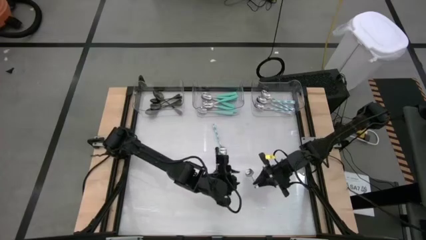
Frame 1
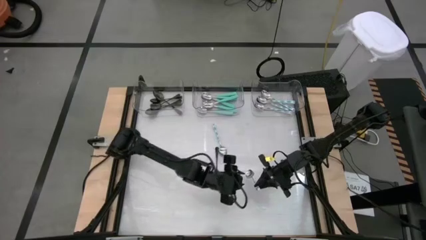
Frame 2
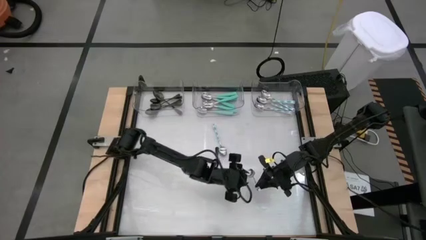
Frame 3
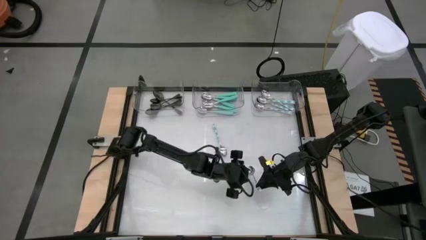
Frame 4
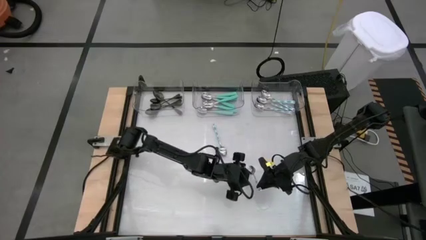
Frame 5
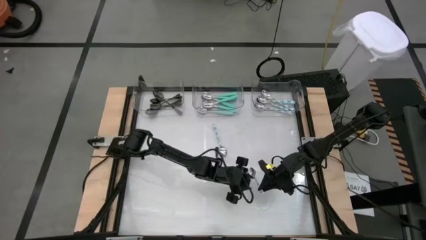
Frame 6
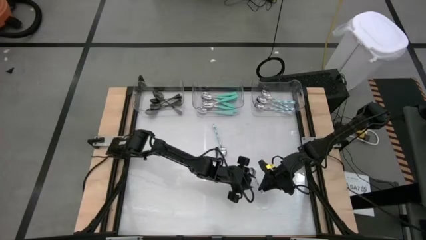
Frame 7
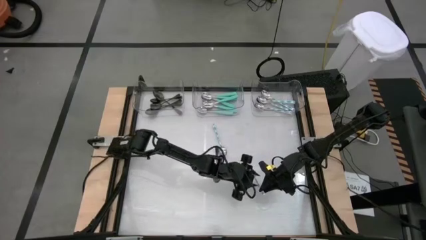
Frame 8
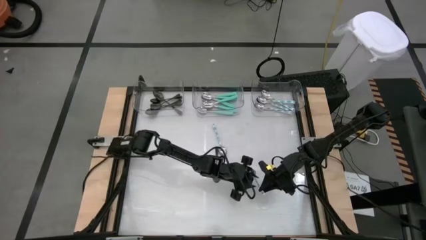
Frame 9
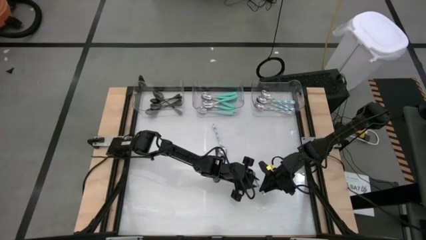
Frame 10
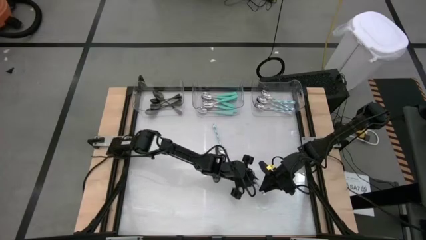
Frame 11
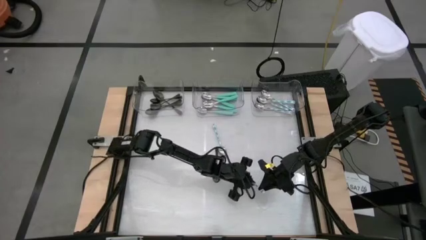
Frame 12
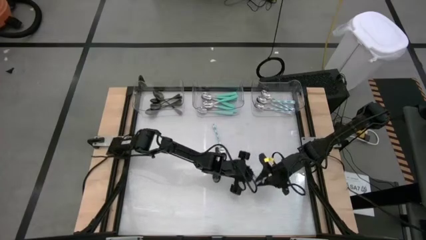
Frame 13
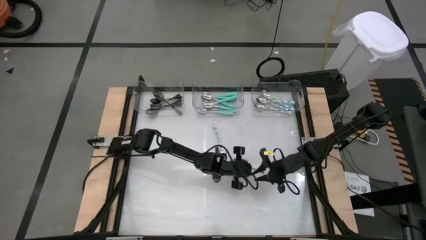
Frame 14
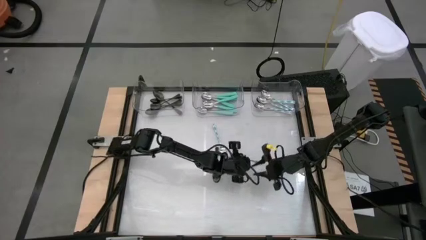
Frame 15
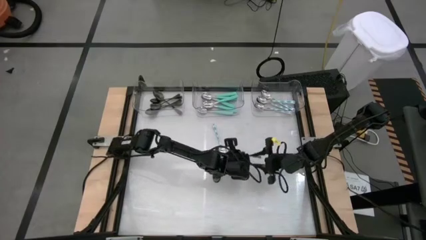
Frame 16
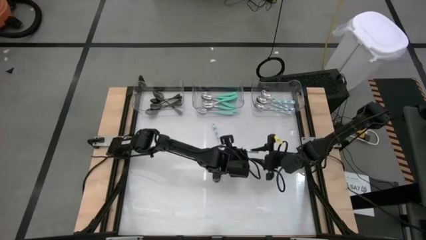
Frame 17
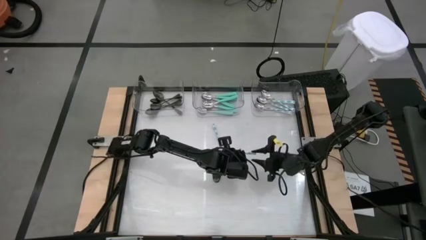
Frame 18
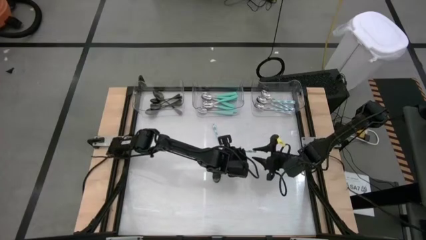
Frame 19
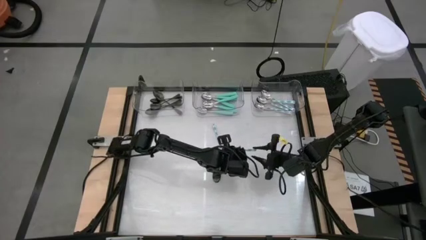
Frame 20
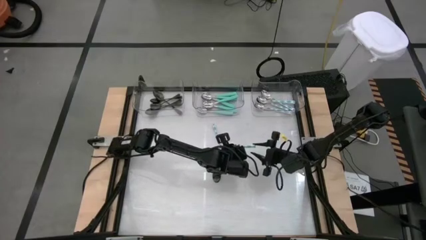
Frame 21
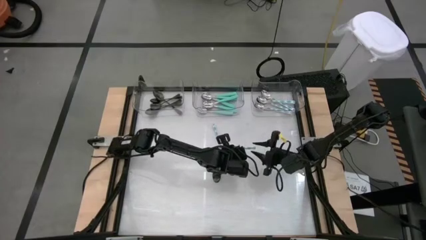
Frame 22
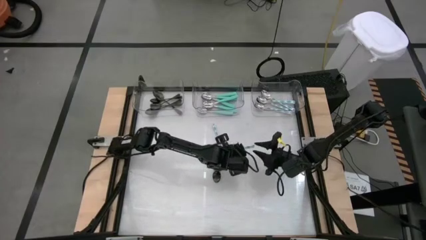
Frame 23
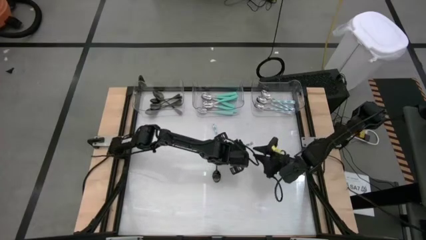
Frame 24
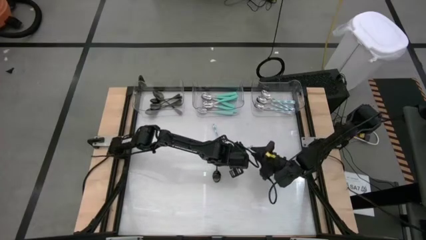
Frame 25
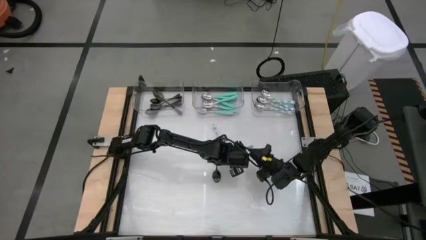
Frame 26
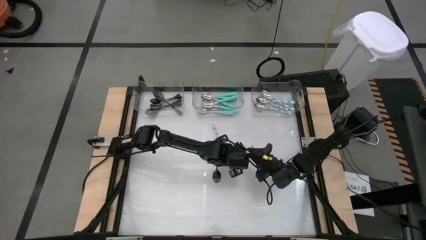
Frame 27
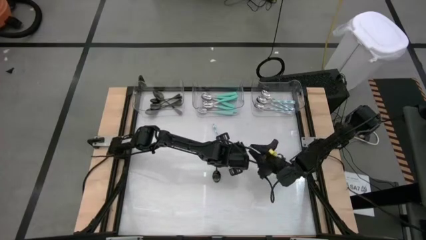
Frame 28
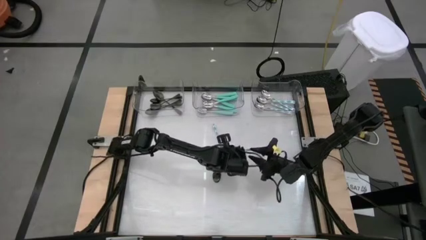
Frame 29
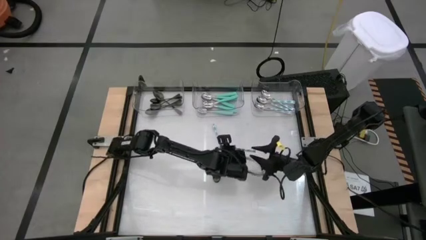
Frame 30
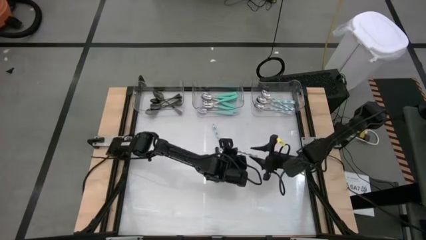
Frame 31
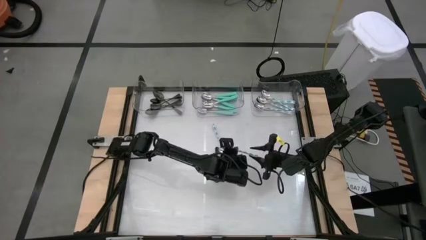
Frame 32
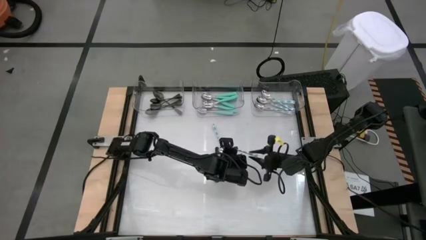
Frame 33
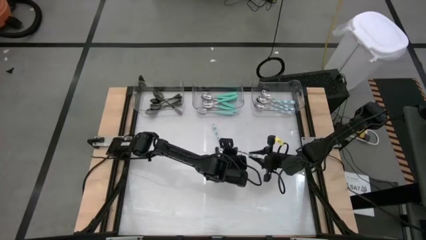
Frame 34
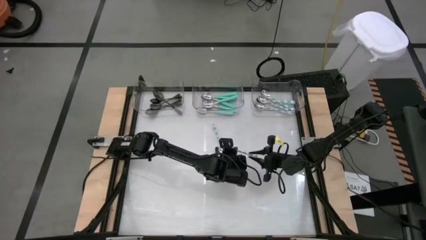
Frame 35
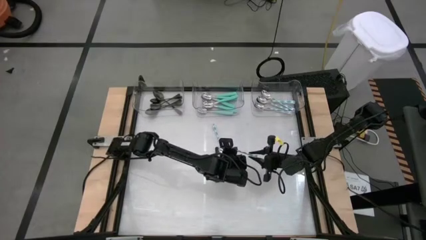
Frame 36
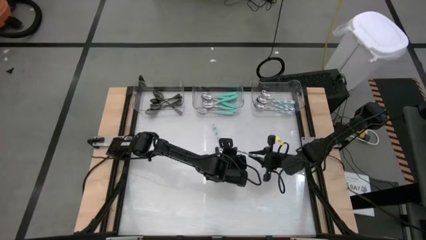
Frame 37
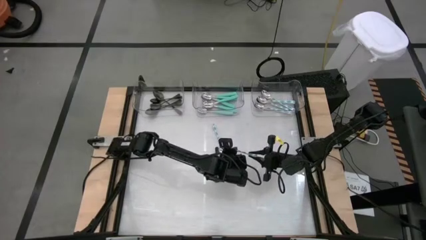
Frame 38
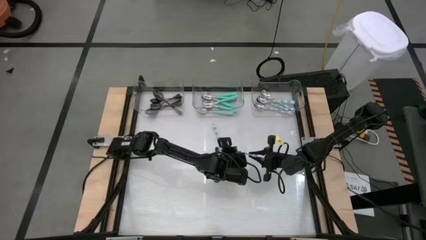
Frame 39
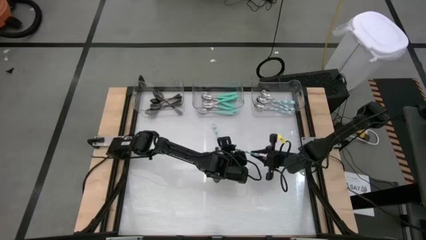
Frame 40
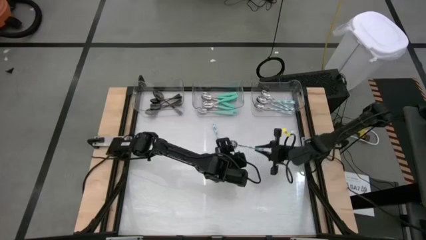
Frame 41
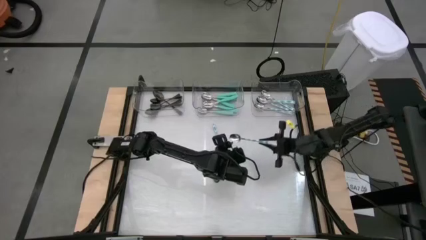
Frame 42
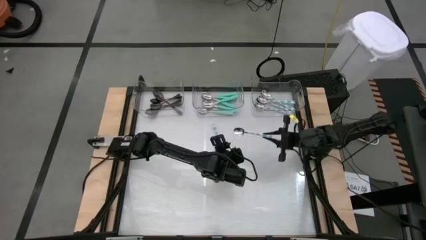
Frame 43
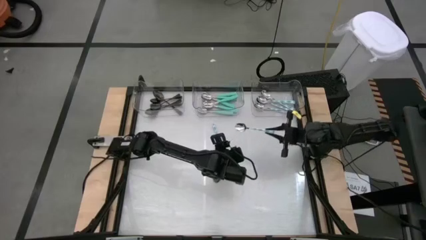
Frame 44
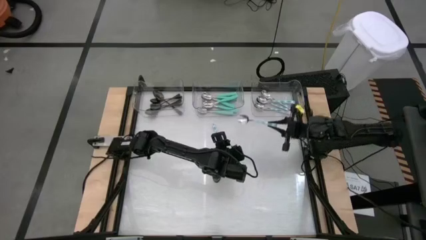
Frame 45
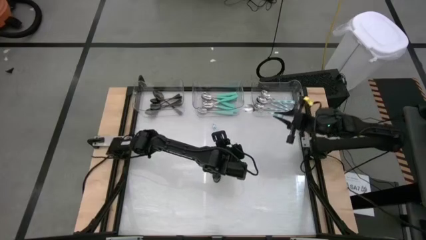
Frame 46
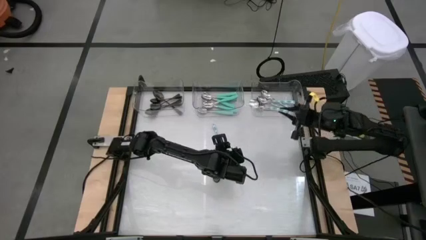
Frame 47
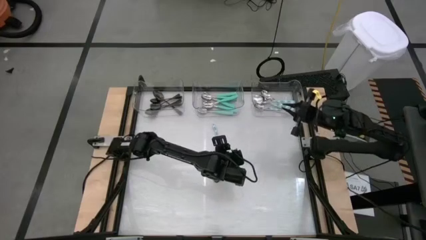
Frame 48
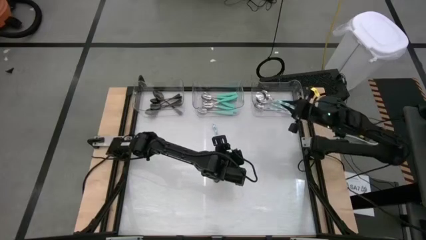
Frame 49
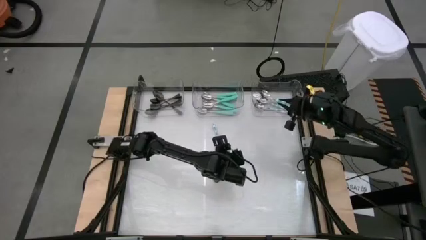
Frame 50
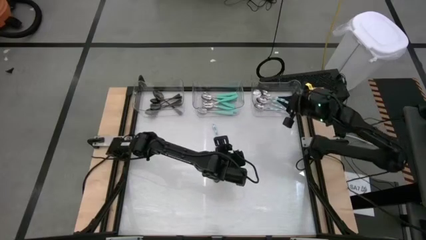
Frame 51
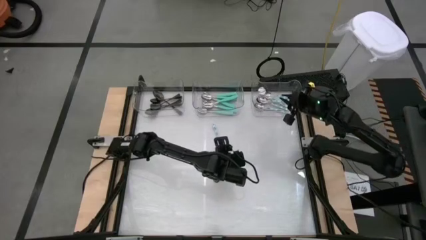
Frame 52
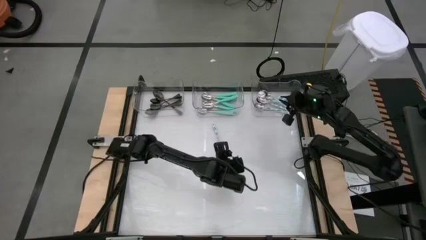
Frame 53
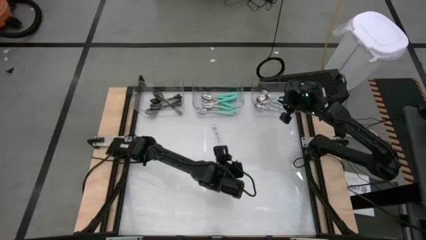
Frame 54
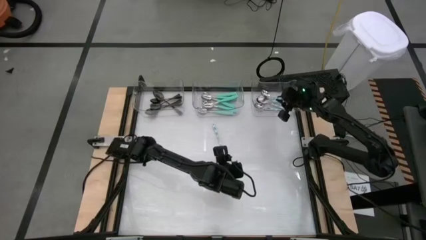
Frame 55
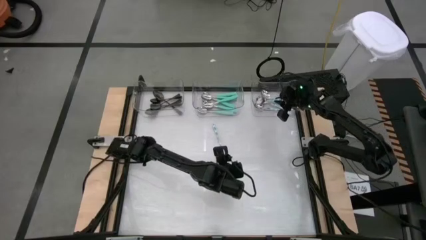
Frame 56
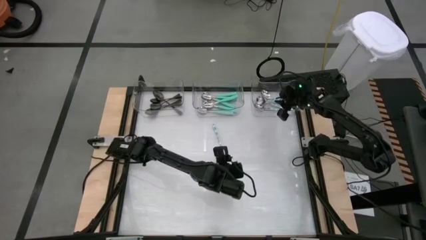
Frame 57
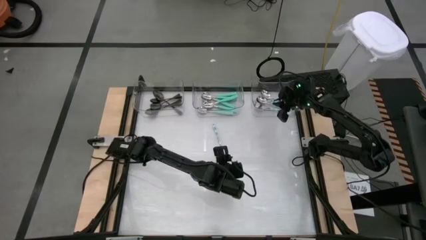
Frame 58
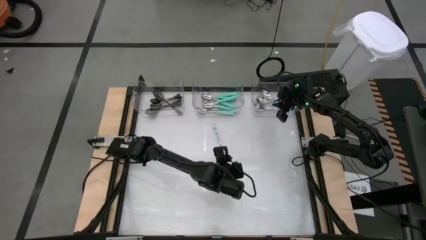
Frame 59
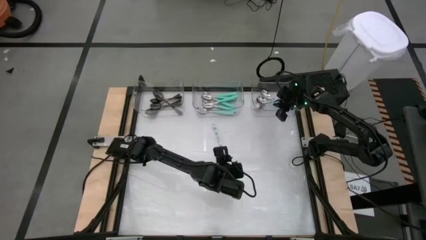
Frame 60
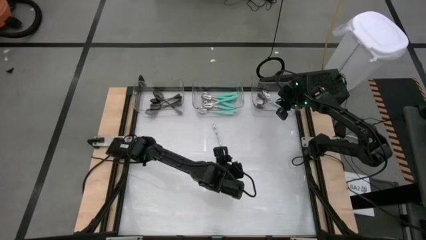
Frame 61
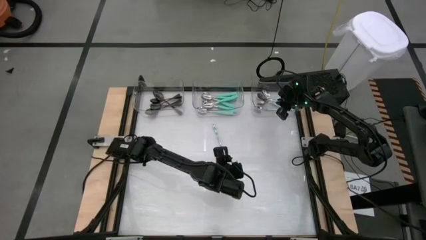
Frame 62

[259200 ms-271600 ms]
Task: Sort silverware by color (type)
Put the green patterned spoon into the right transparent bin
